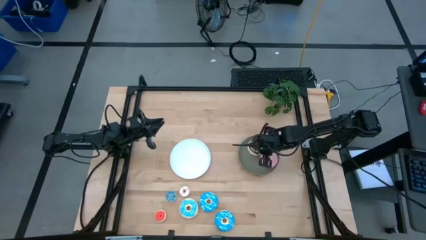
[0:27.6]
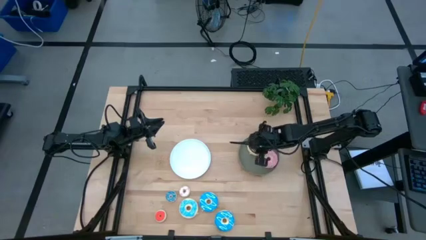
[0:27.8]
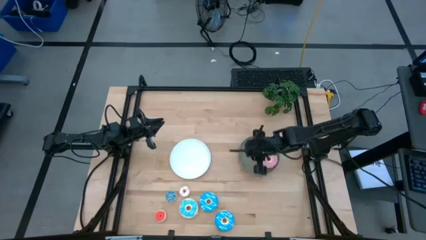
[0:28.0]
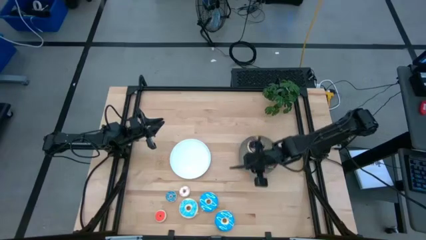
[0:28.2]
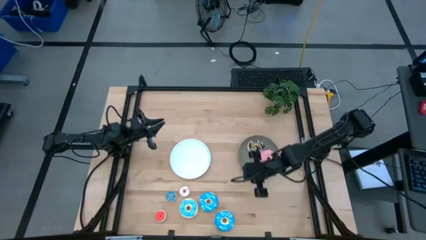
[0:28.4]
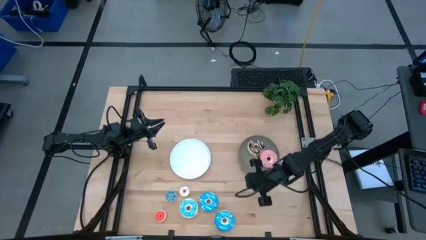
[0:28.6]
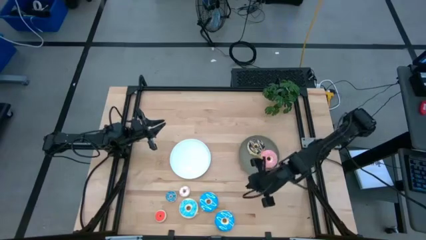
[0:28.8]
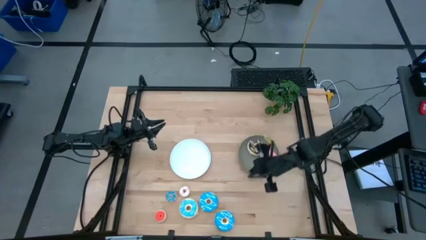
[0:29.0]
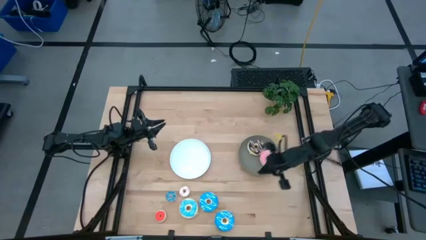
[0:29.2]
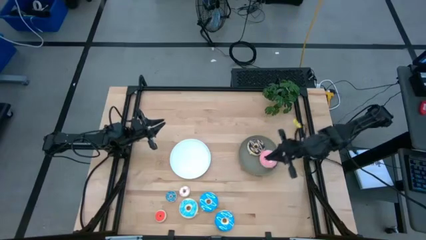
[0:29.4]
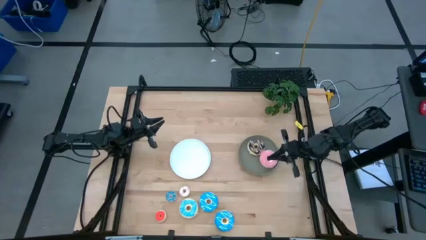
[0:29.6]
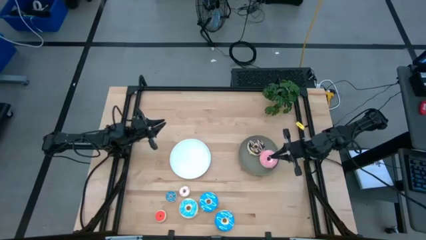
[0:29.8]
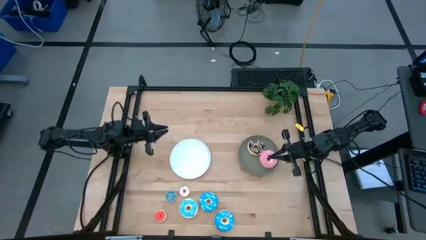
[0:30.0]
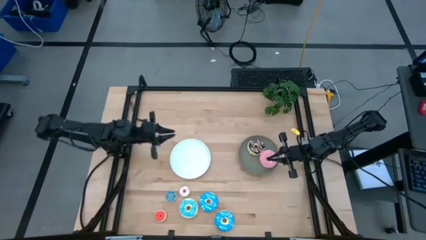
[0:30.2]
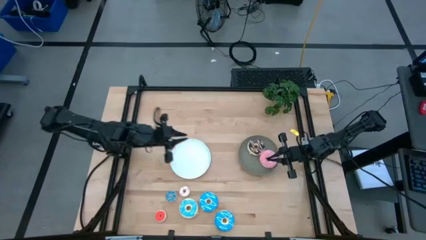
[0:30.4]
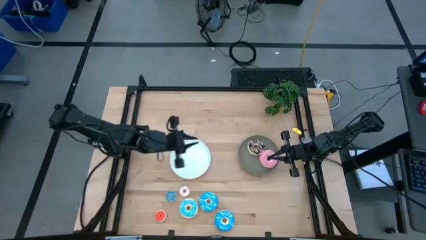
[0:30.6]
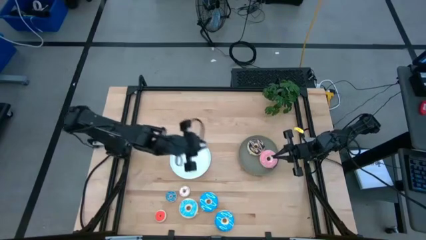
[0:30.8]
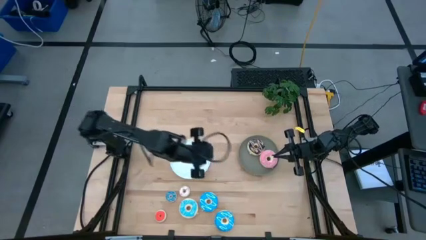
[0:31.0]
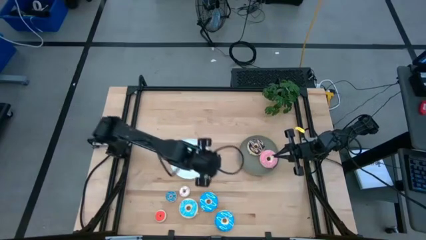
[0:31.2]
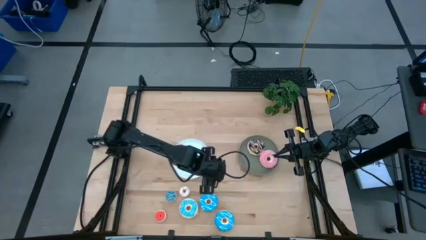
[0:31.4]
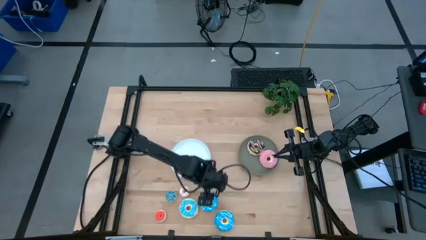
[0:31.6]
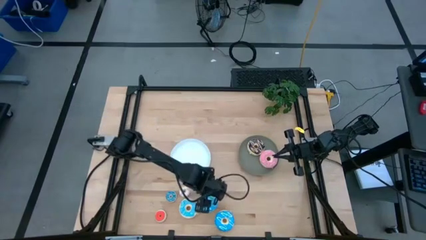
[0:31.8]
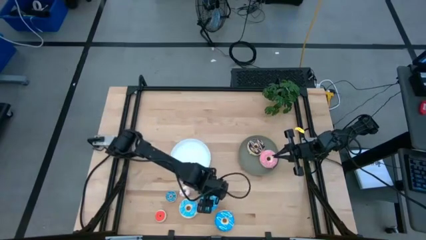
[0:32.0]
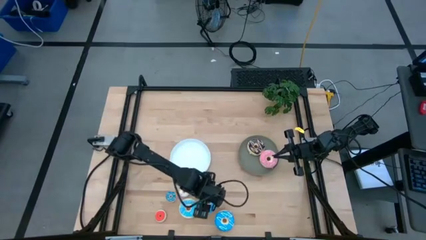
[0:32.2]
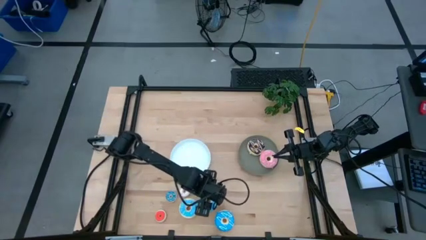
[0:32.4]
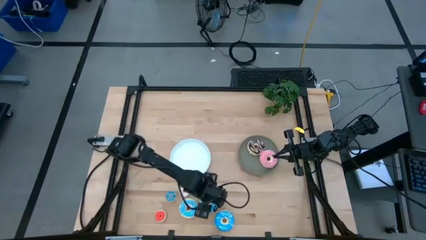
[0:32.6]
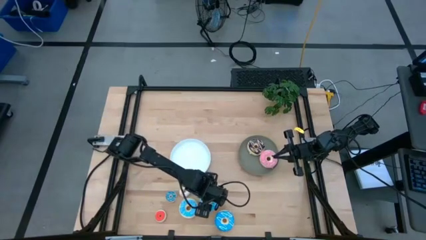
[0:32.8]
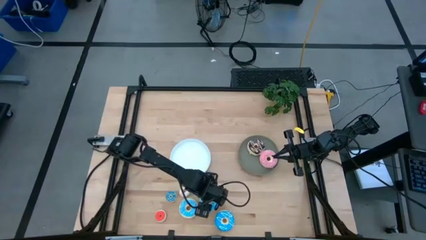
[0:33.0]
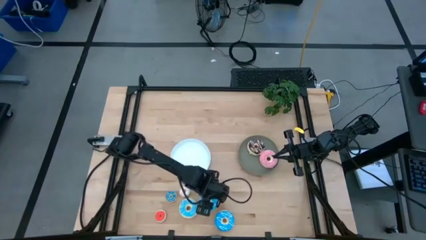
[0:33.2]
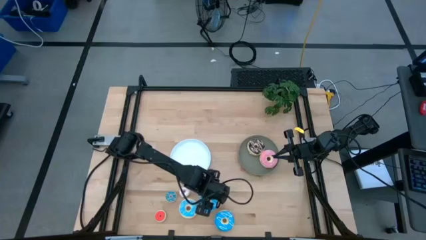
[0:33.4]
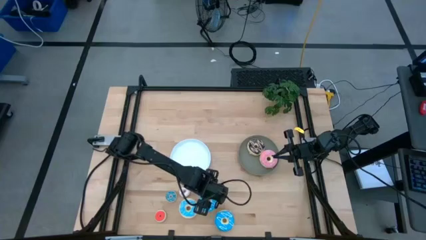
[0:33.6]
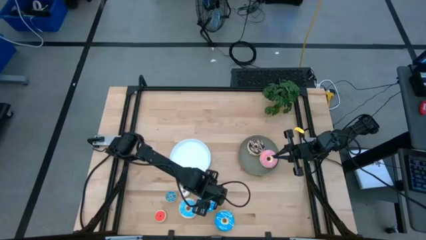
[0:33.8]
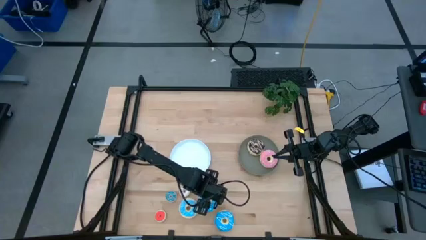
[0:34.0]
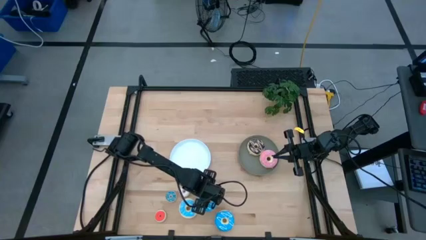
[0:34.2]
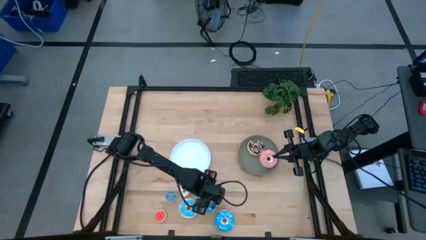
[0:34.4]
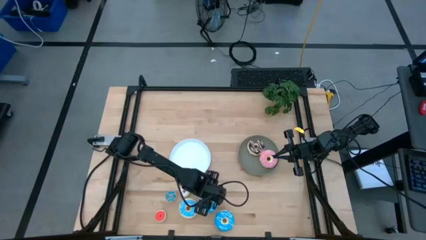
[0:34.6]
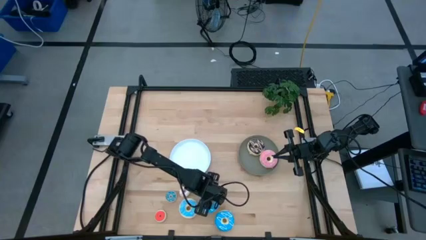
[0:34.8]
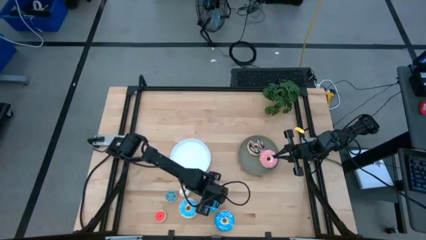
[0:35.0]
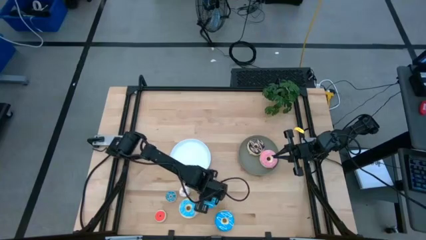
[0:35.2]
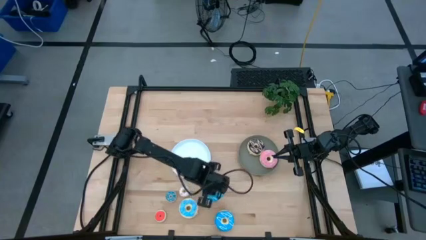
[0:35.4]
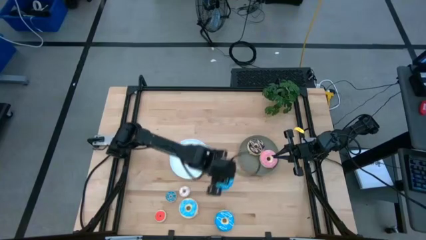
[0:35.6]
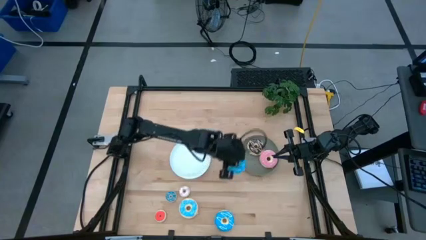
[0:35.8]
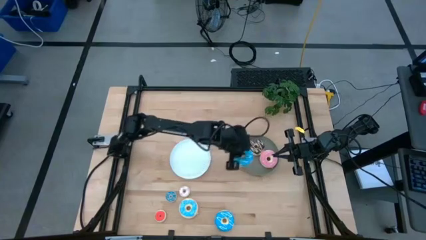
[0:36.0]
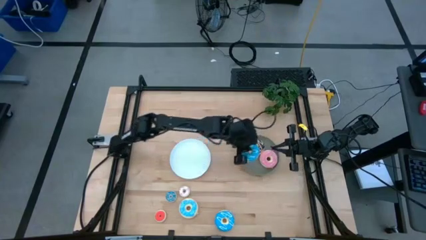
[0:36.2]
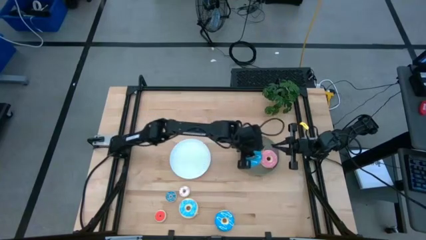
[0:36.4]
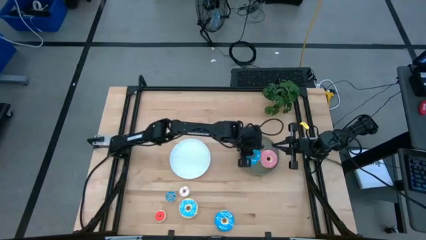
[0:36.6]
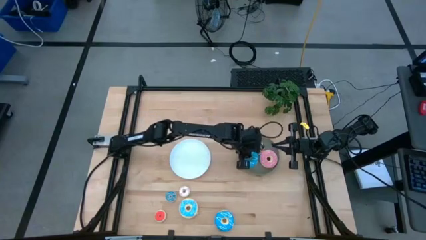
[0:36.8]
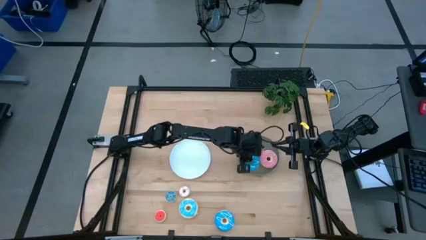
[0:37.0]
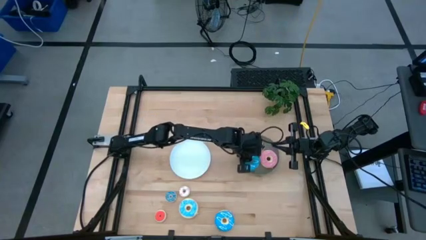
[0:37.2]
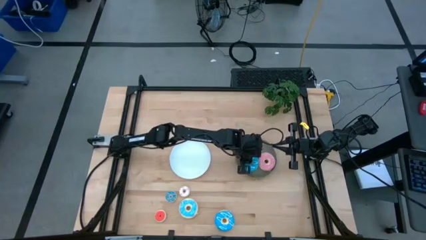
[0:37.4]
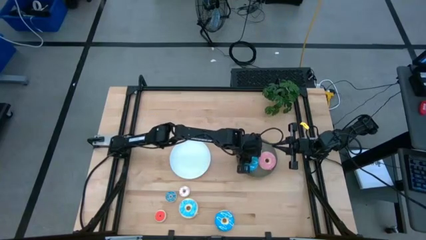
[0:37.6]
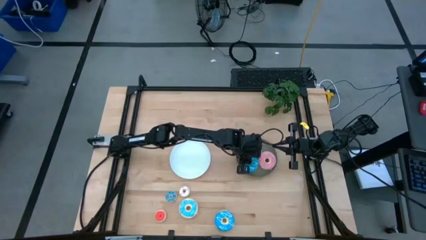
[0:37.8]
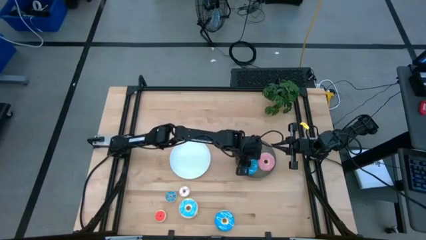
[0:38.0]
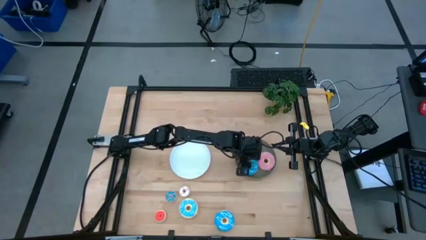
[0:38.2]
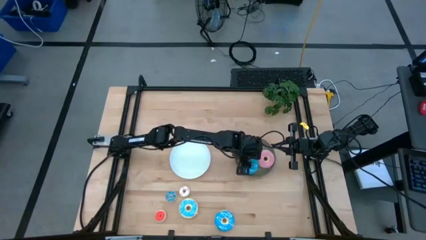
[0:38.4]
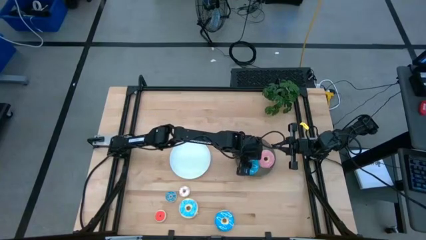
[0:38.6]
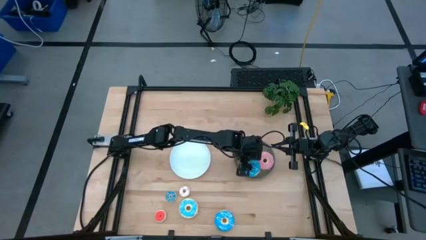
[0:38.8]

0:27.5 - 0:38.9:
Task: Pick & Place donuts
Put the top large blue donut on the gray plate

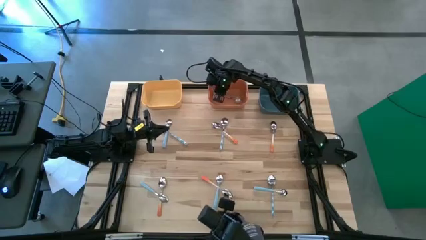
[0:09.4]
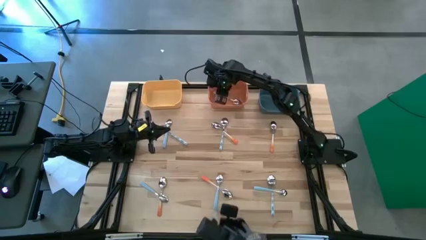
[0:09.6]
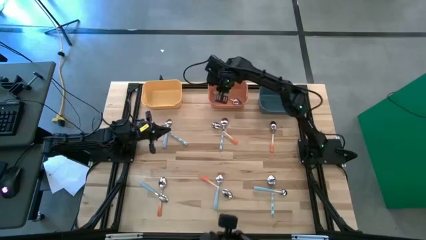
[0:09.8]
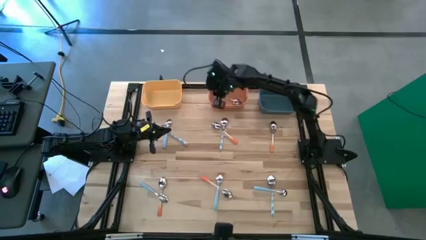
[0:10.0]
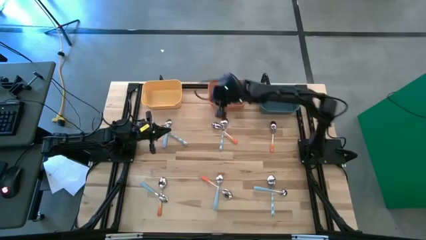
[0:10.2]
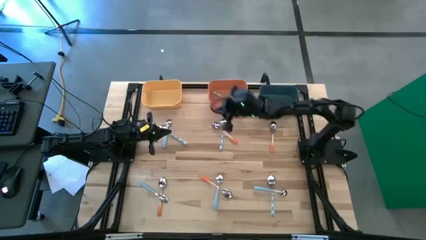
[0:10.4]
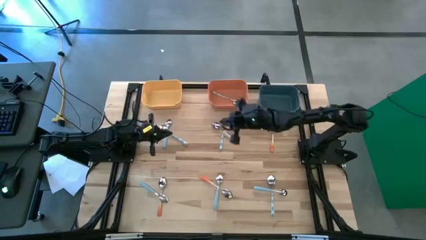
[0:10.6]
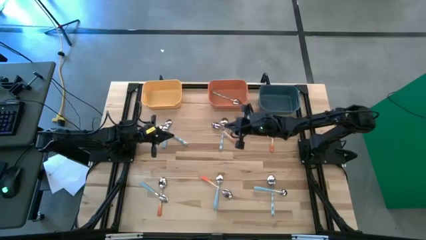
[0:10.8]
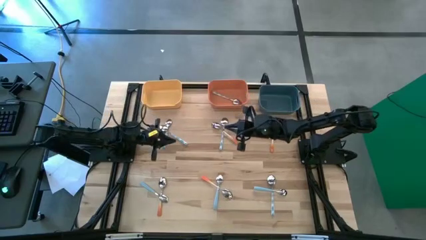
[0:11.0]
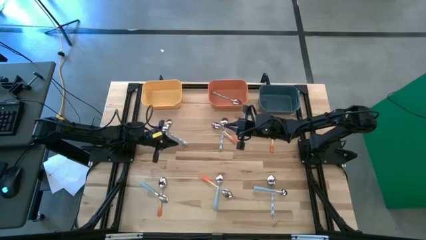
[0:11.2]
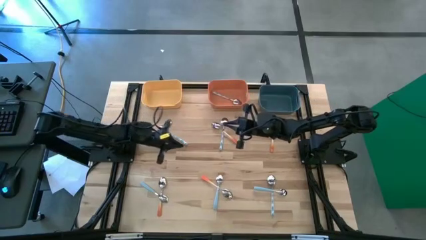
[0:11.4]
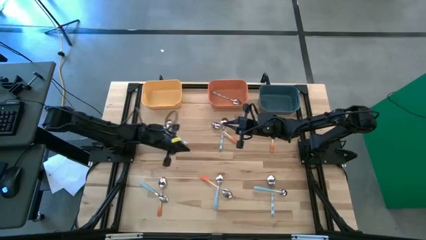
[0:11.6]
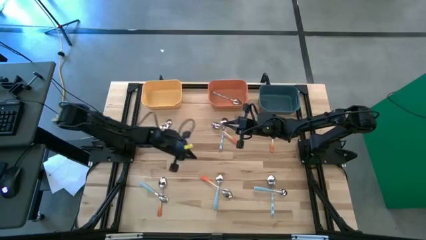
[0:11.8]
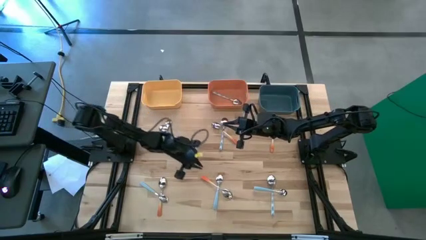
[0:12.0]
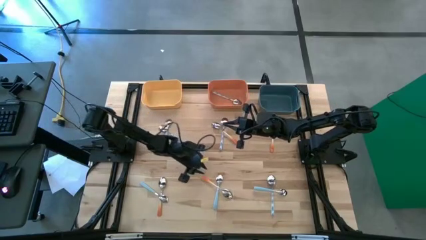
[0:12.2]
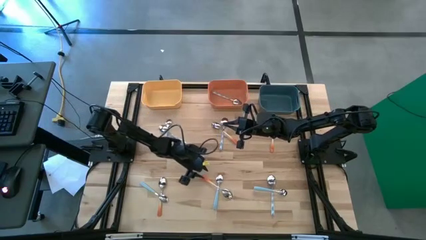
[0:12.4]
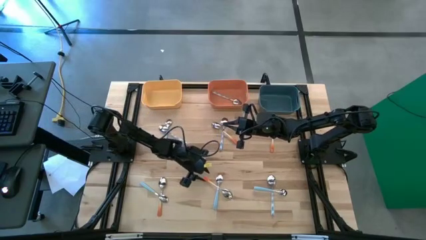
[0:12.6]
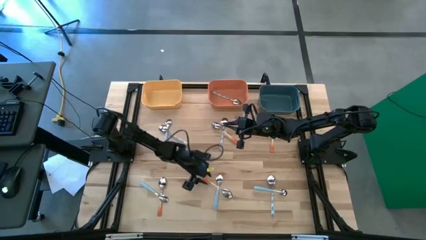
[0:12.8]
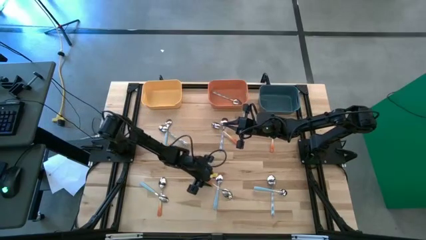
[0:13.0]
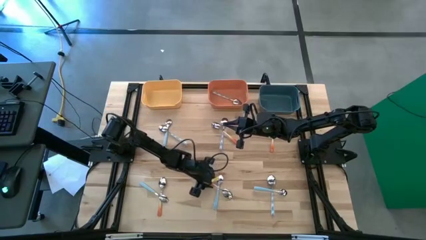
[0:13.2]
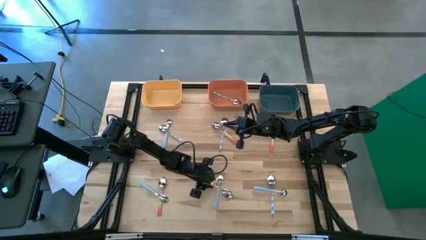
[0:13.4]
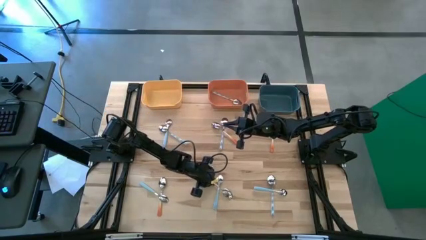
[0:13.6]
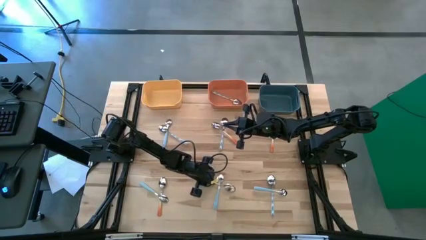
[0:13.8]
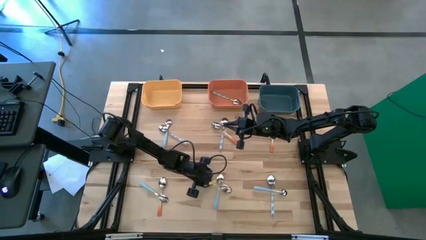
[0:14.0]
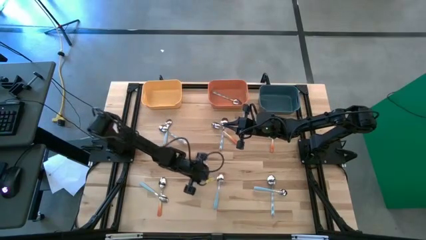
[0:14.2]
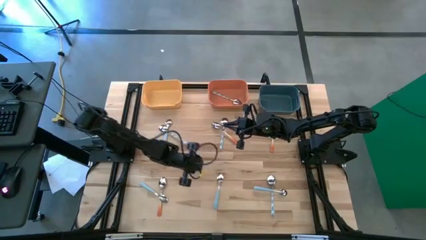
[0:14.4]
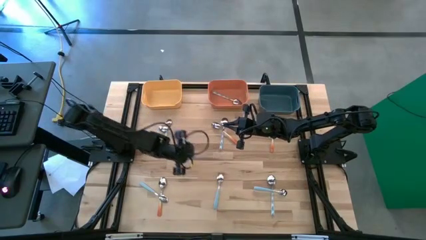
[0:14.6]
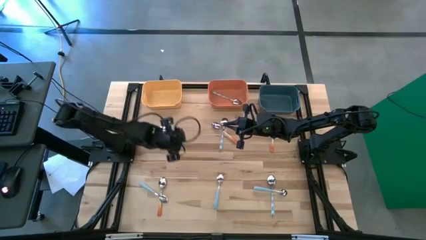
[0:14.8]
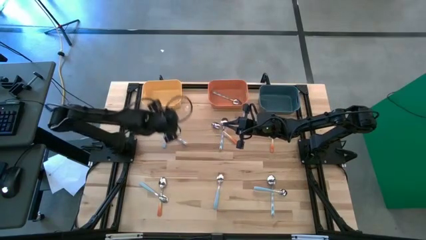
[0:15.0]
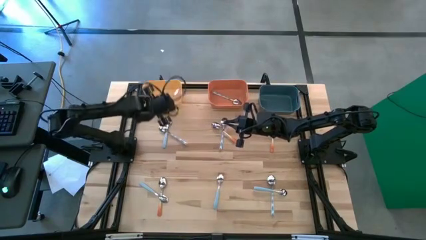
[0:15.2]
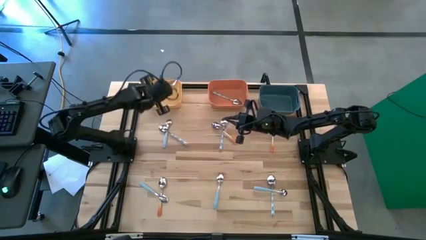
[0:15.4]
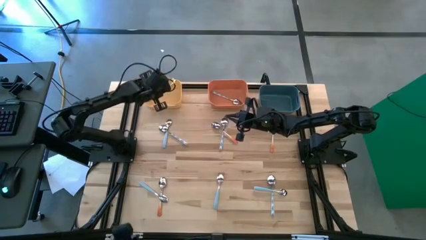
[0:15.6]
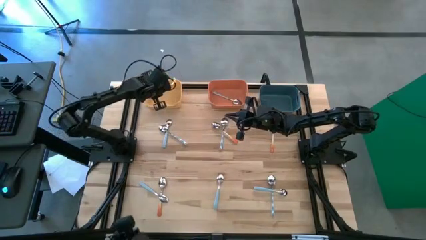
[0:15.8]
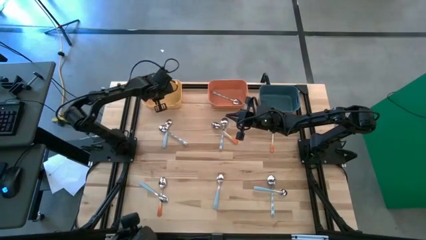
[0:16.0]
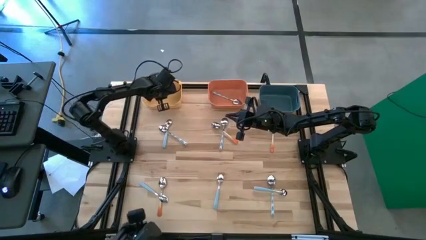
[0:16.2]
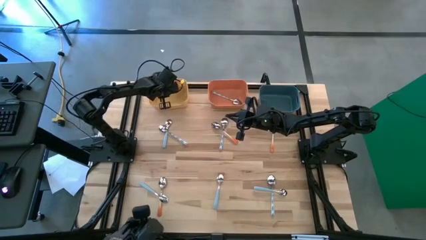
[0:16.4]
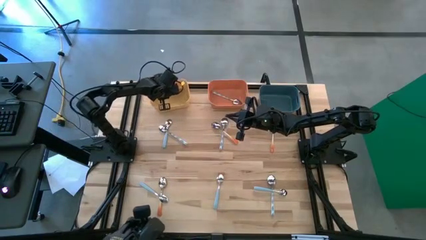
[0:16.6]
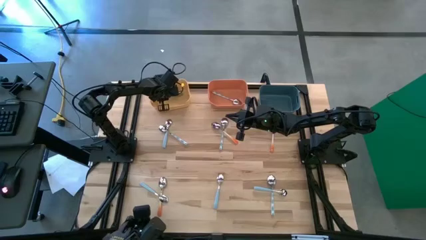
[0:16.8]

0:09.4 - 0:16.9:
Task: Sort silverware by color (type)
Put the orange spoon into the yellow bin
